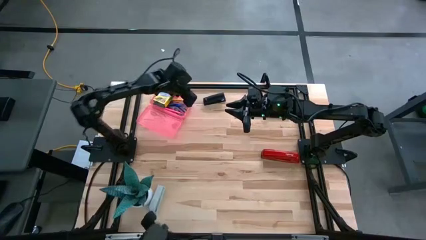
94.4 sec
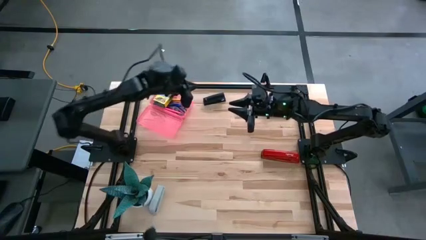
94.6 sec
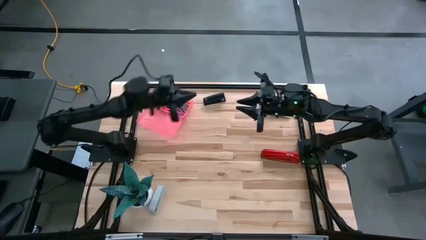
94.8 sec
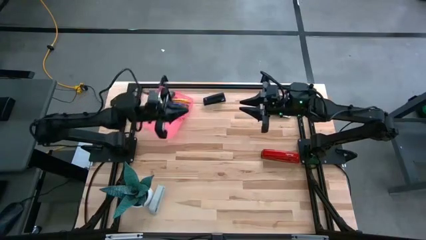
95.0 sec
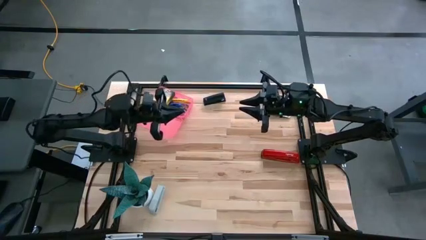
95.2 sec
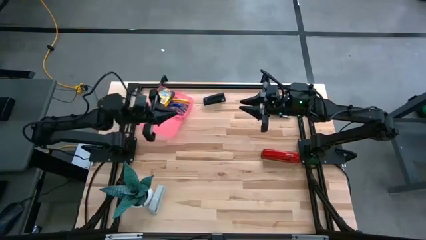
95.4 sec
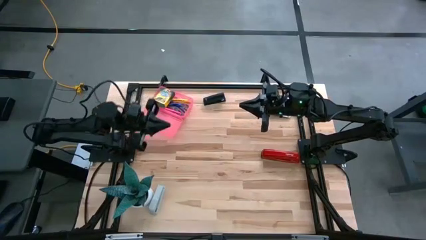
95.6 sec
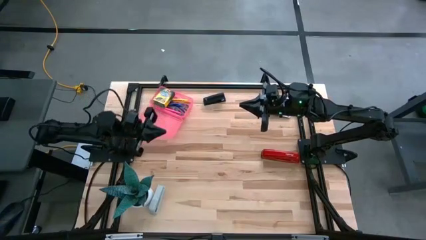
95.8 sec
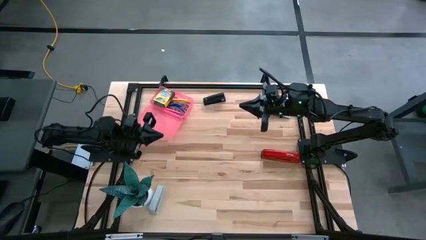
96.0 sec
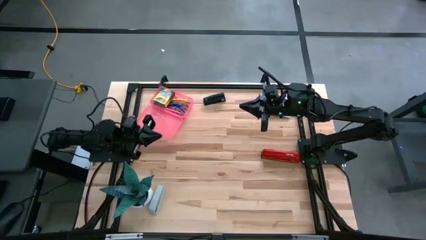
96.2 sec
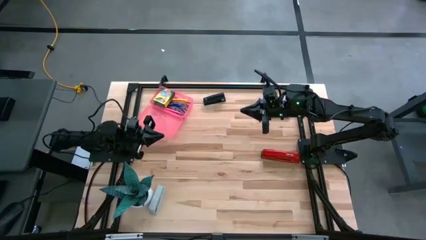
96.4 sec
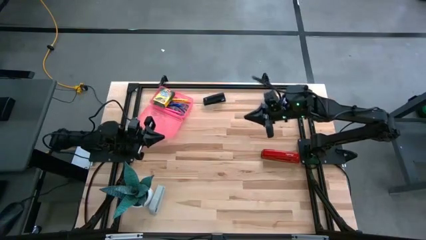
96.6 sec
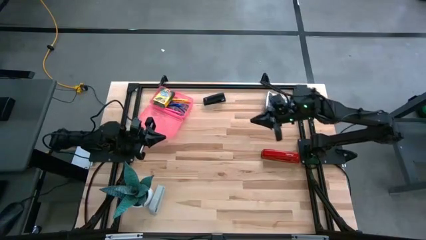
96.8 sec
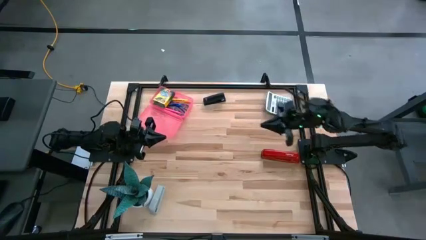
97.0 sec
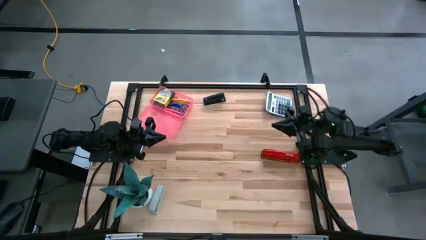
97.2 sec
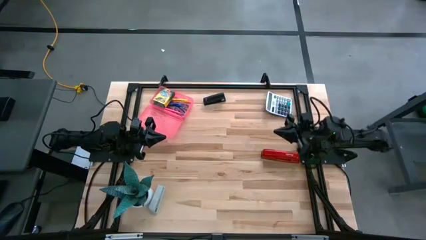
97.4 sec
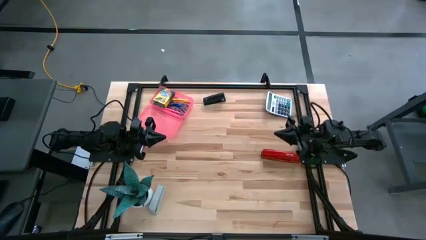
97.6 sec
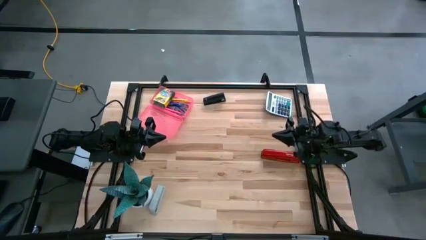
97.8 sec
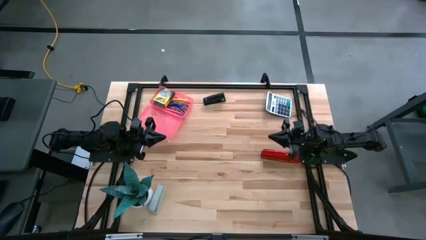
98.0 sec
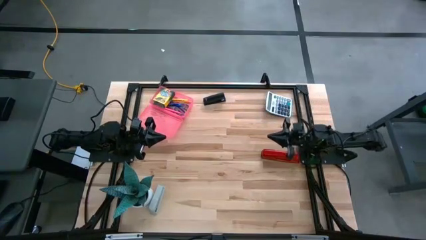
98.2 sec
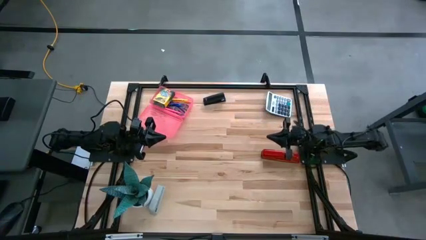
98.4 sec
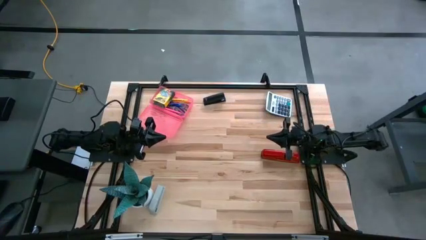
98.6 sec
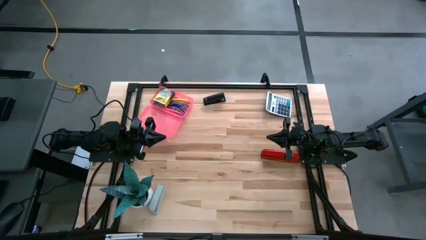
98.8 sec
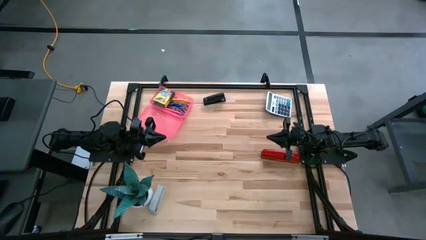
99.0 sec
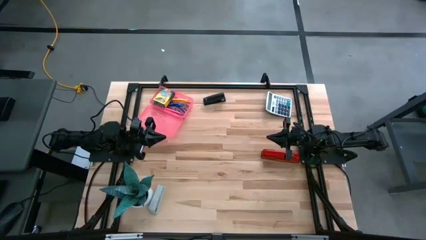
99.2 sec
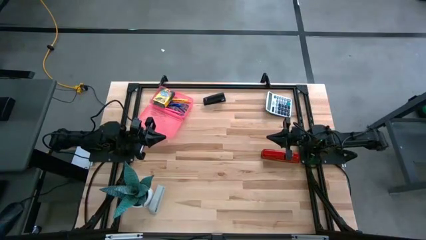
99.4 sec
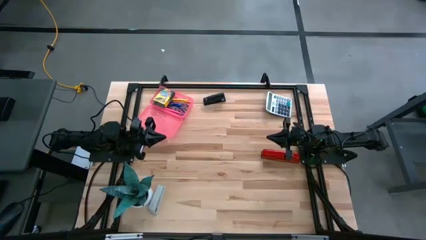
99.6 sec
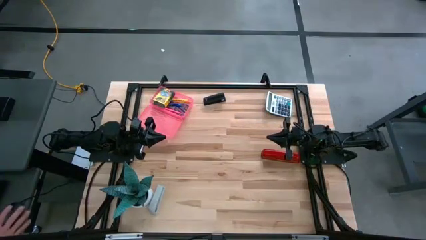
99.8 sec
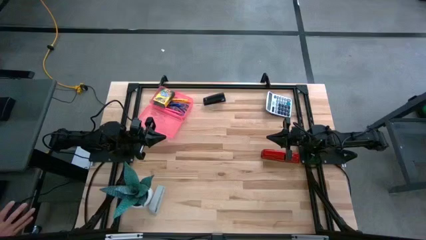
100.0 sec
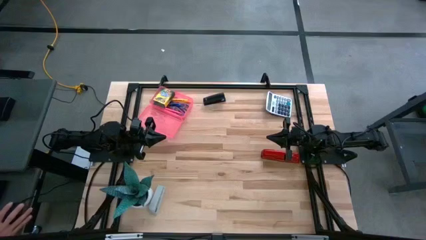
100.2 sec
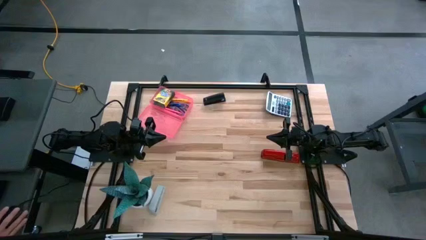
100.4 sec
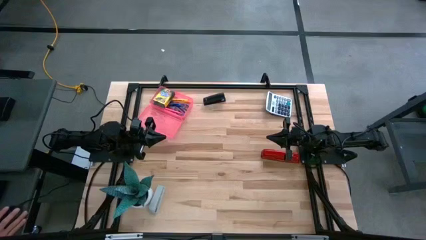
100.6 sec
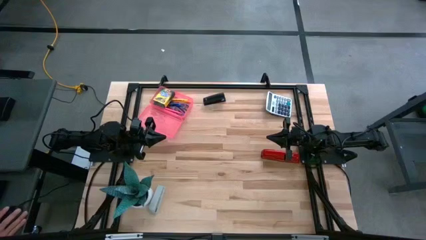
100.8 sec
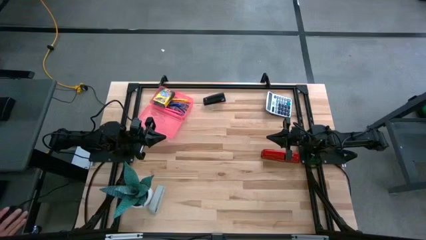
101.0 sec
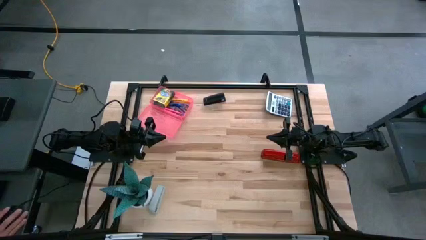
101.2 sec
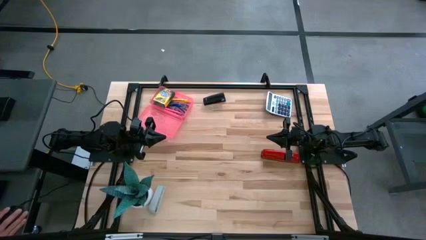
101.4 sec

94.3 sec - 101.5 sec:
Task: Pack school essentials
Return to Home Position

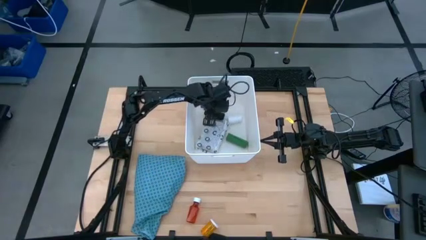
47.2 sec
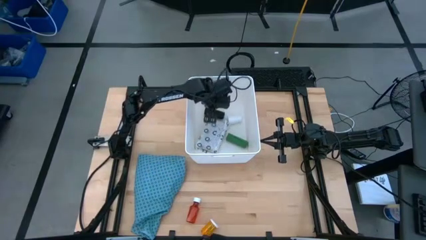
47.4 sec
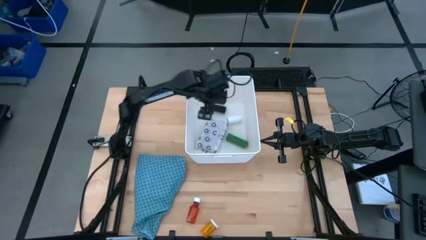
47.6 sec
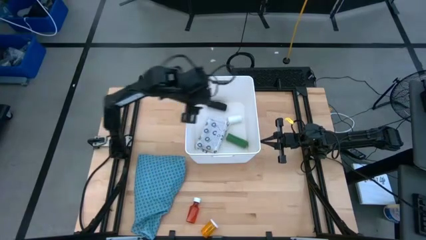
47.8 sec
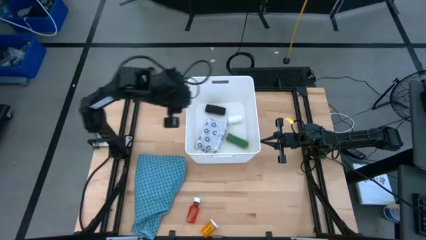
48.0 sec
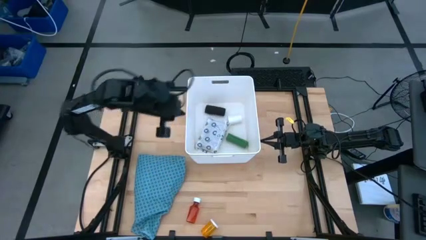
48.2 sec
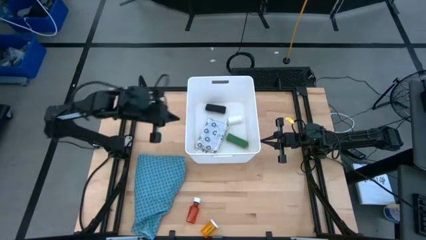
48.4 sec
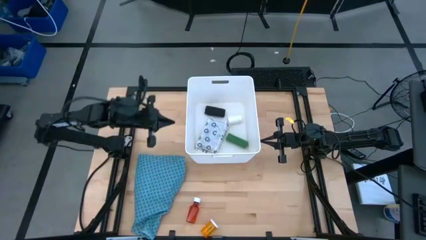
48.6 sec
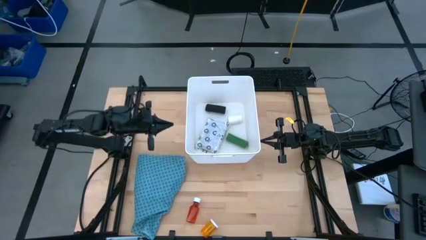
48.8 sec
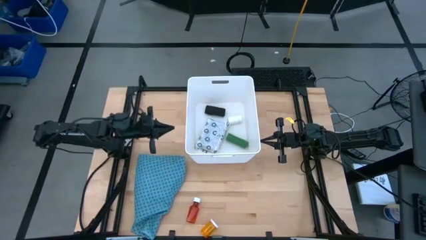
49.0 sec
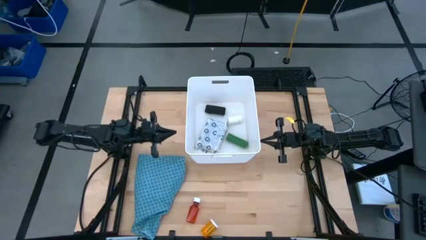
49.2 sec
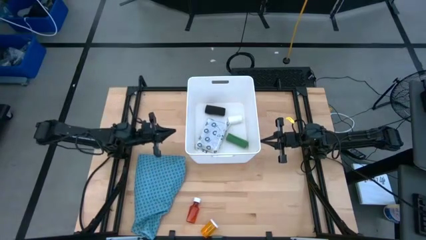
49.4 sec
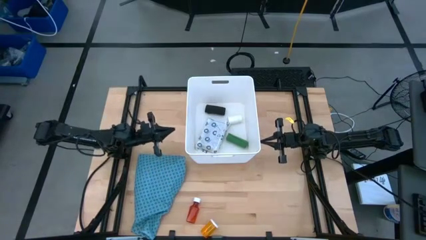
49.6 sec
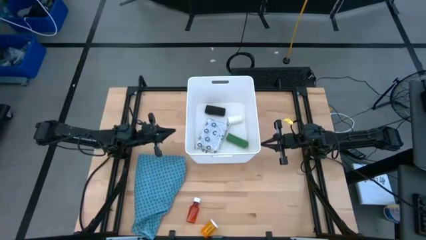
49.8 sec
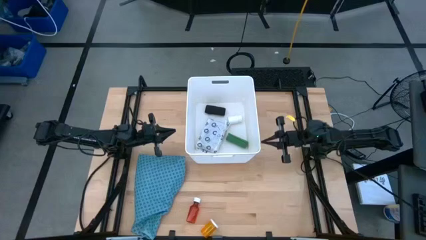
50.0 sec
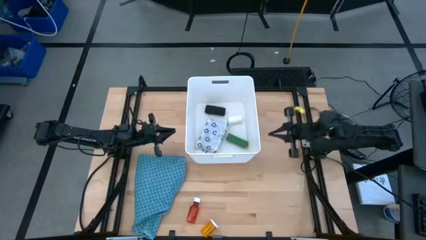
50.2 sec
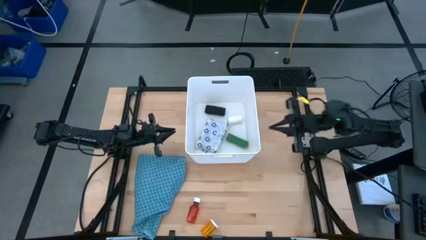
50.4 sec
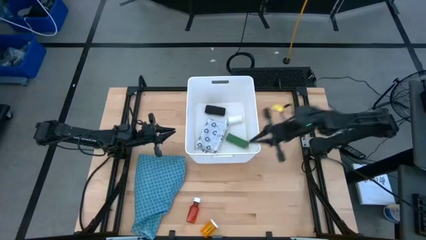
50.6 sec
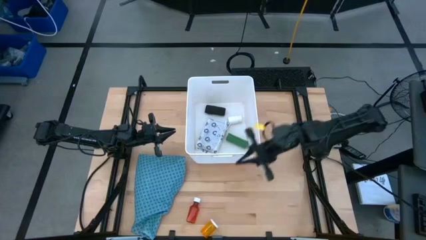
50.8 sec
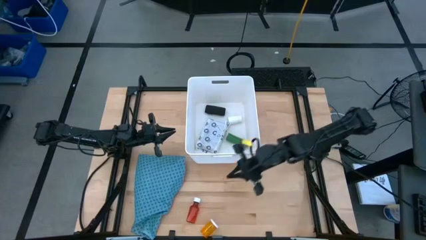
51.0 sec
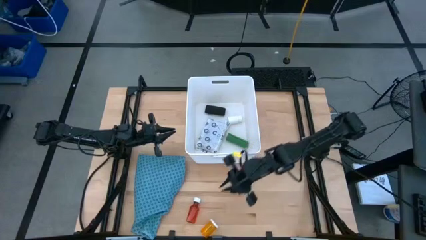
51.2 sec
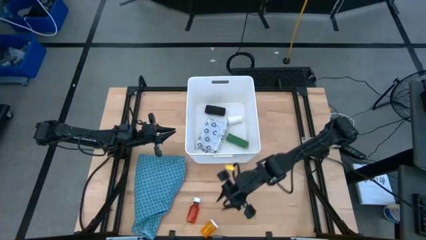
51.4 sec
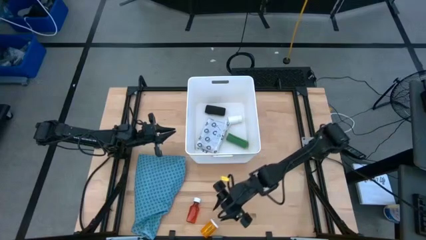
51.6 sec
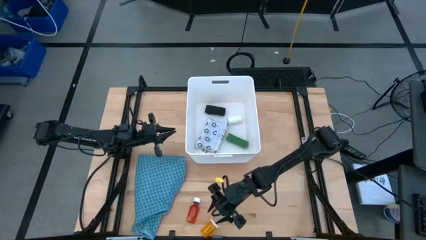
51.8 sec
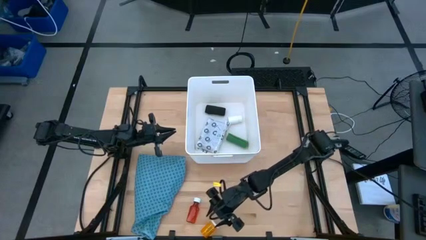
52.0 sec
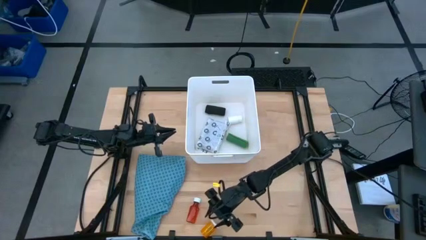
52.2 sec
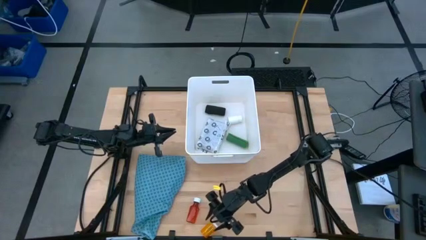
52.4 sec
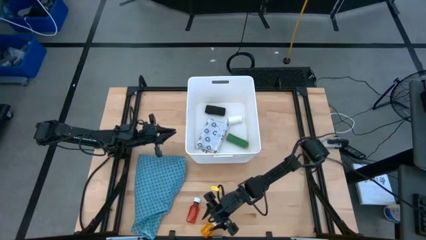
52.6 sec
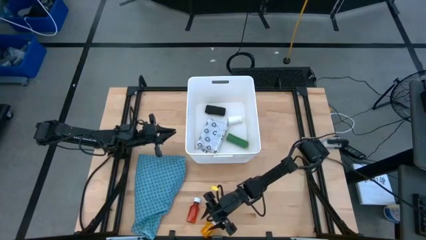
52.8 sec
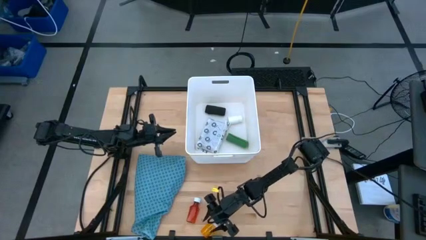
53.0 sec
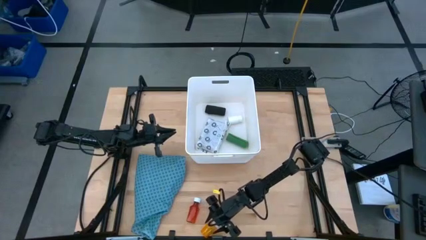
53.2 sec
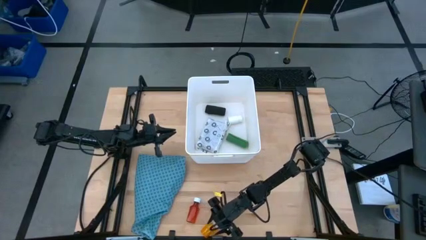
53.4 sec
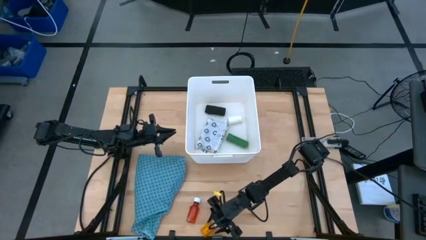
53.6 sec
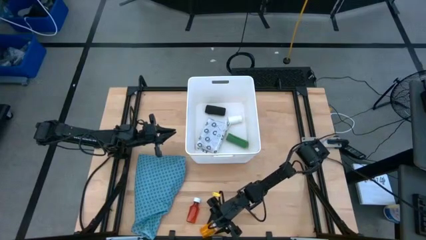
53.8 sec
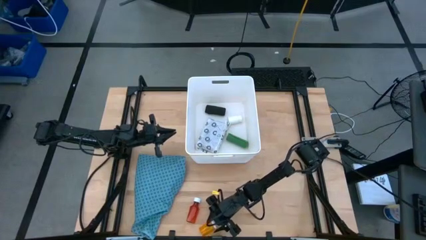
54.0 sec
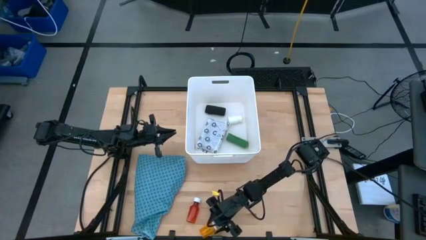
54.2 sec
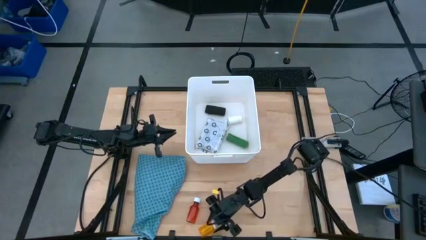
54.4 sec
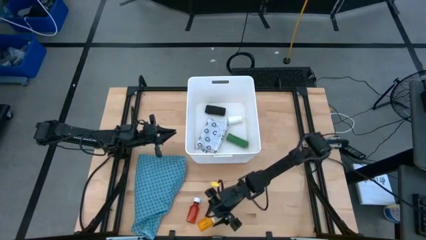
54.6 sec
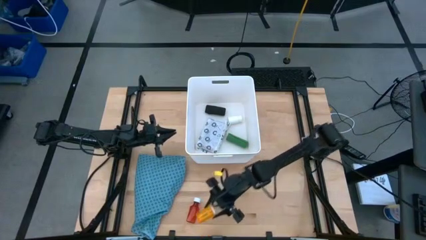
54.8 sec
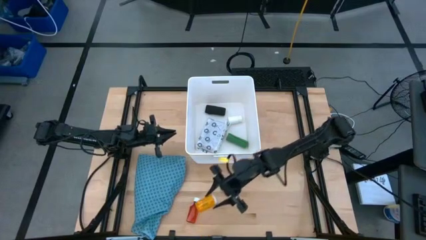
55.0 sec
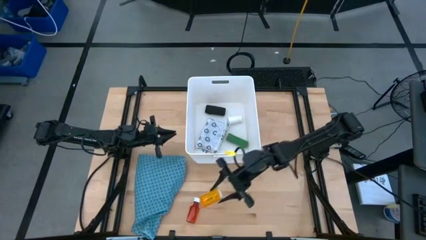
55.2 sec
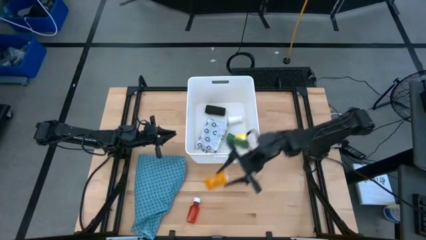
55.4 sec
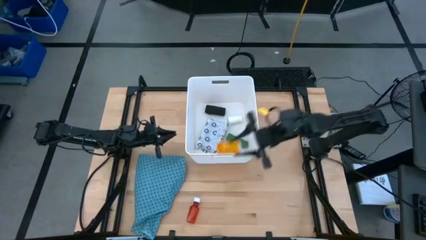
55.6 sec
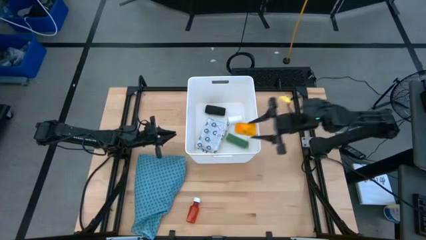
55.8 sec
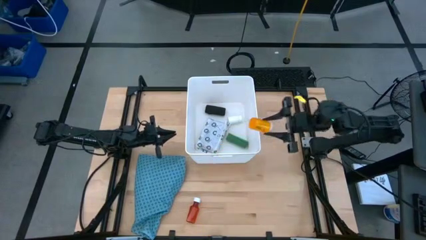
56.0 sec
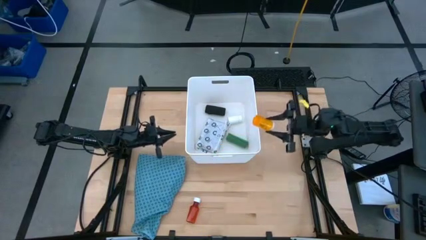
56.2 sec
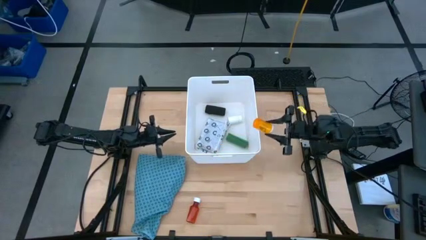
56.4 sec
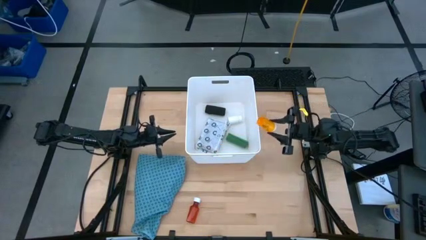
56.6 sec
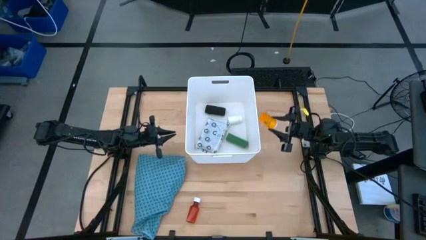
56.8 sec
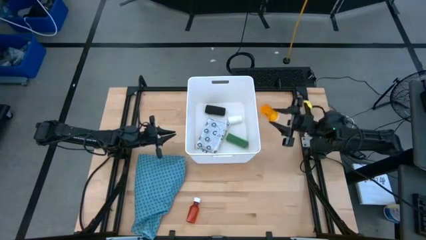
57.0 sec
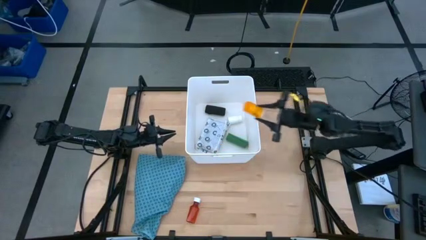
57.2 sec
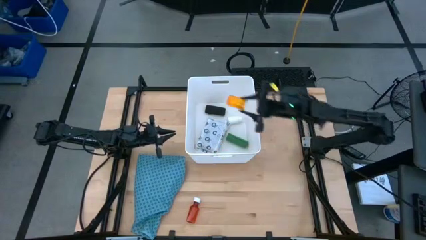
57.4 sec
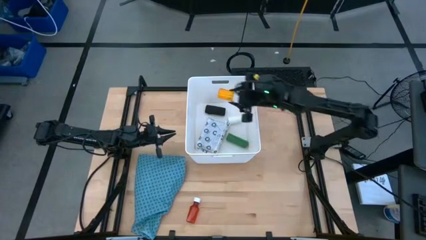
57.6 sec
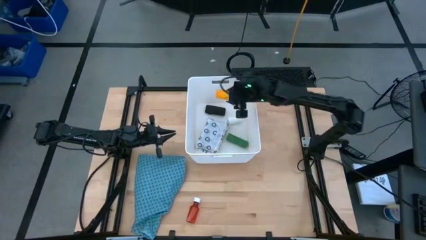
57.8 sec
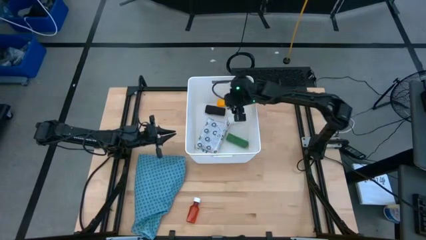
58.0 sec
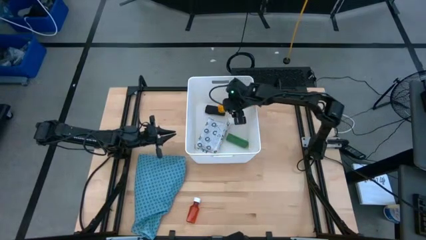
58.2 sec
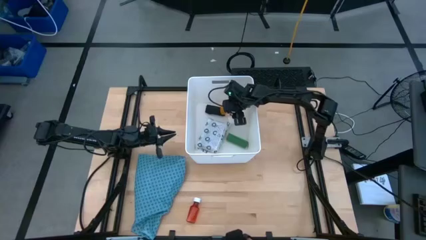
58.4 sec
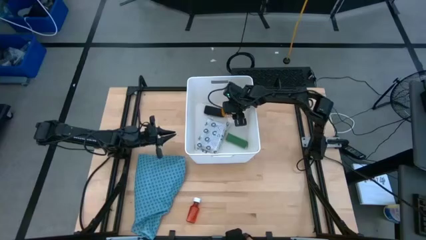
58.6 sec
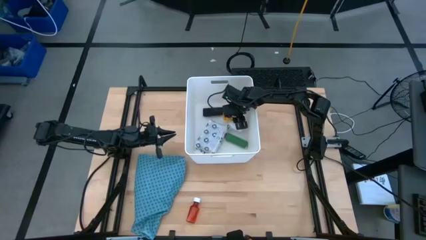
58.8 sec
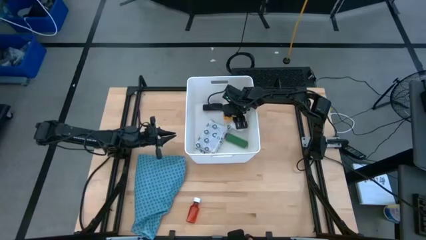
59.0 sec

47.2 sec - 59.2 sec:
Task: Pick & place medical supplies in basket/bin
Put the orange pill bottle into the white bin
